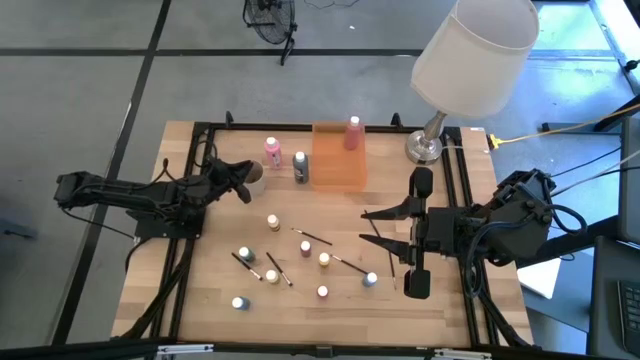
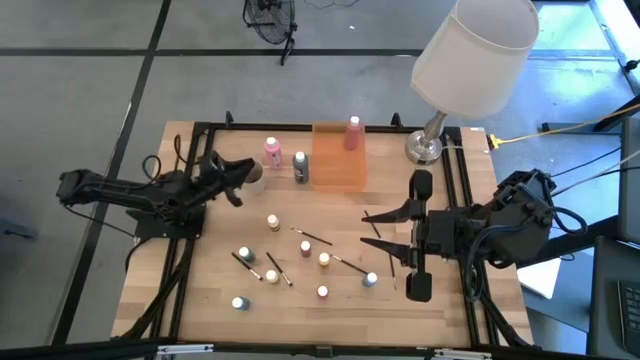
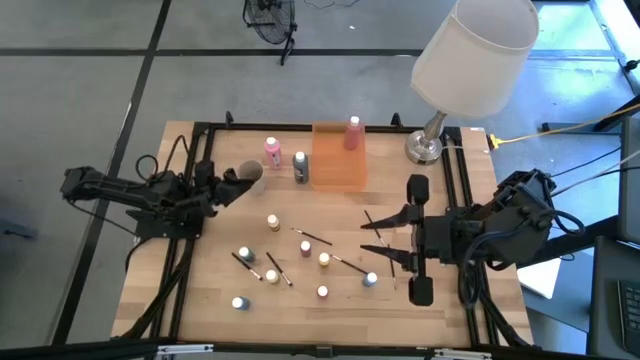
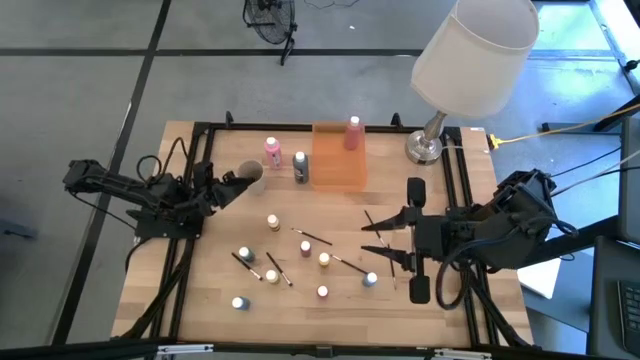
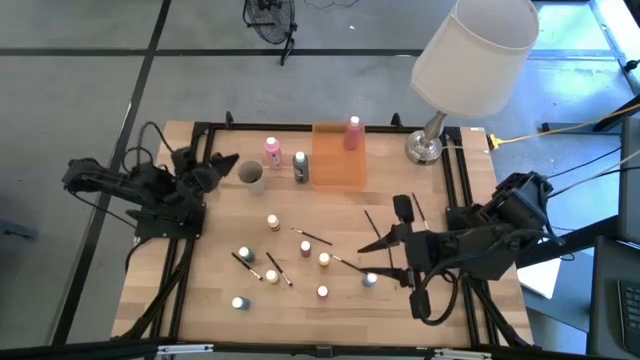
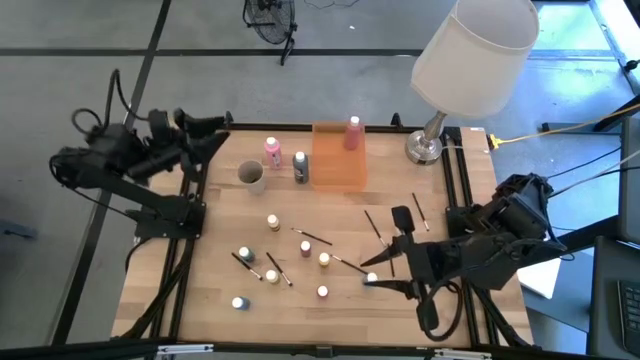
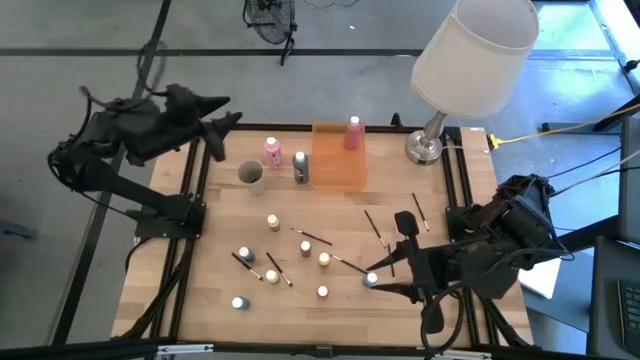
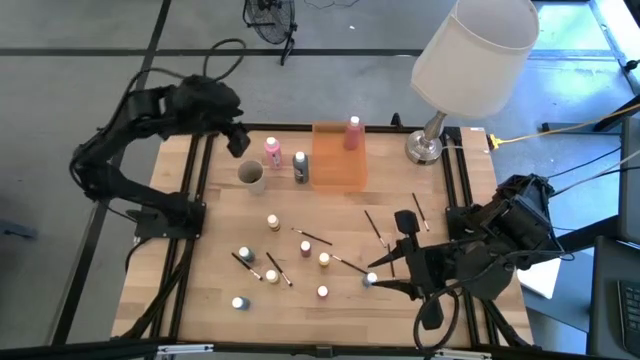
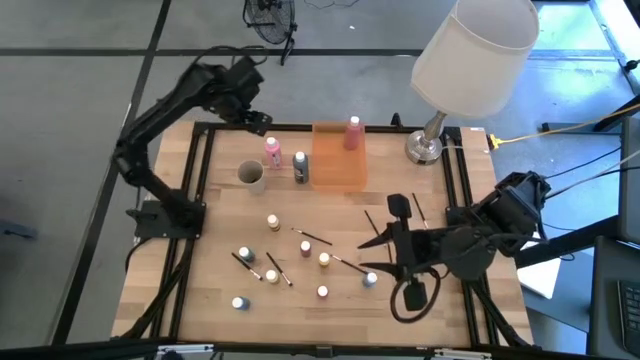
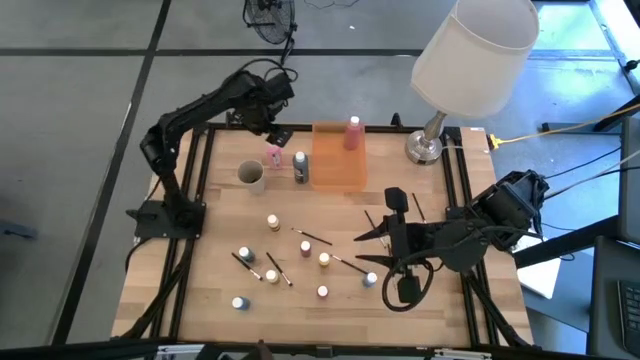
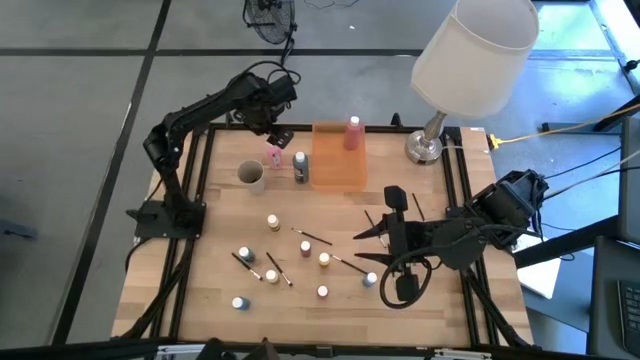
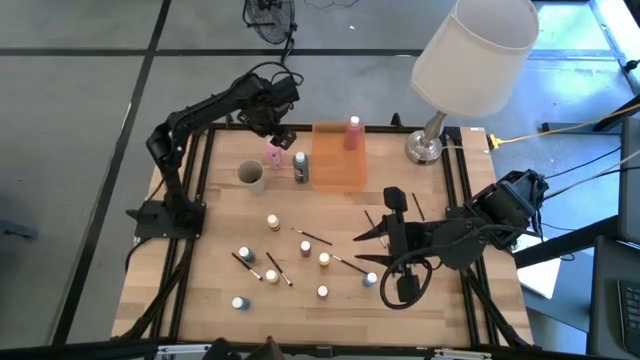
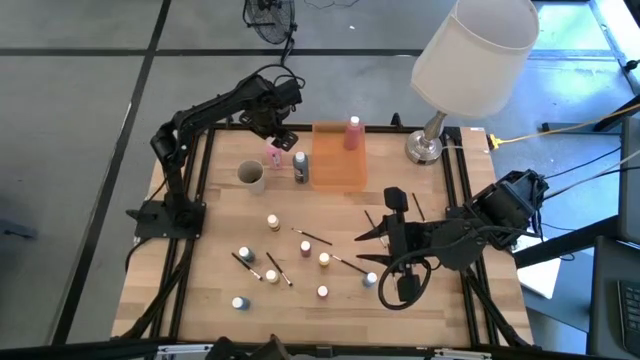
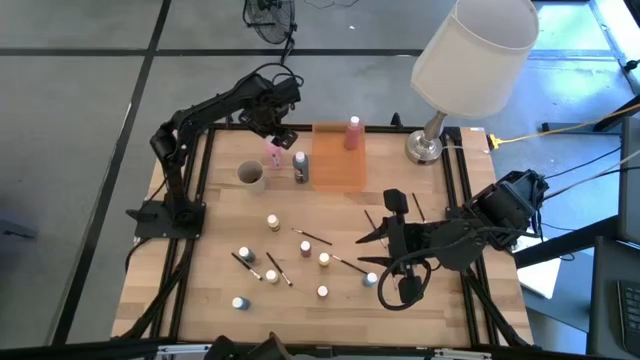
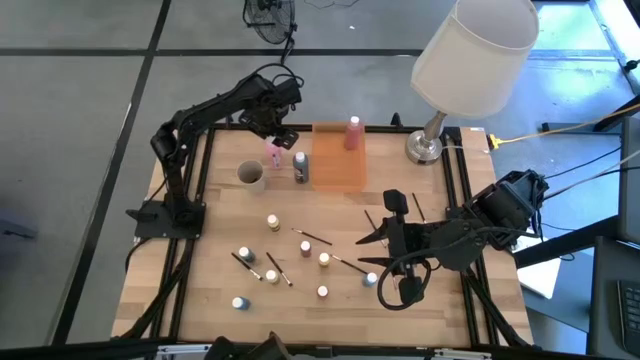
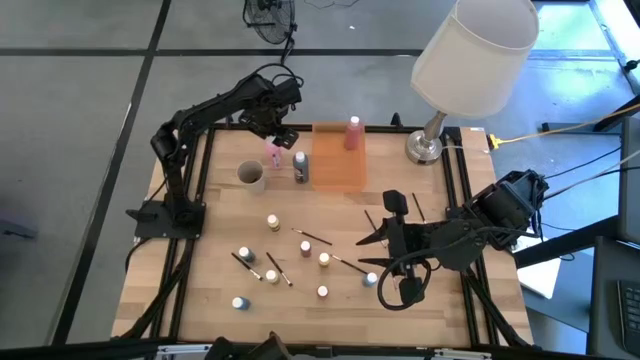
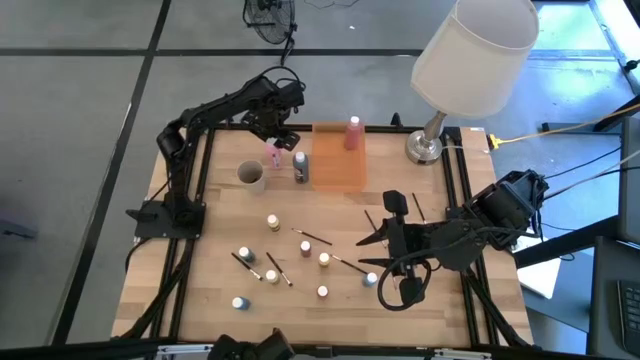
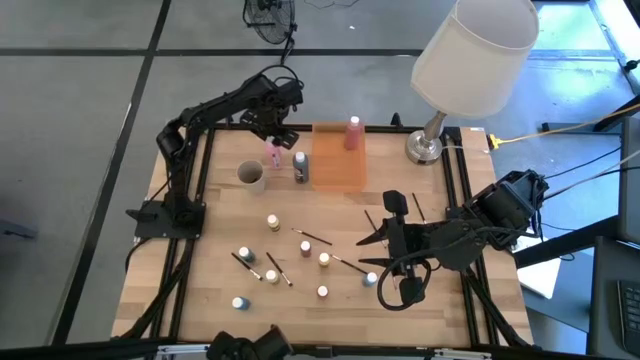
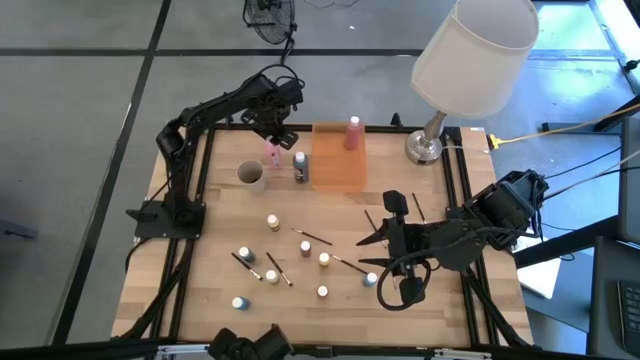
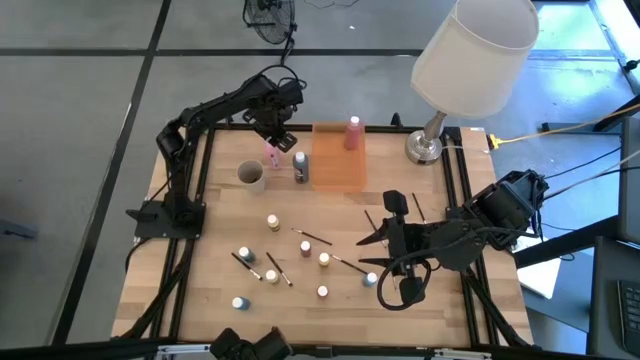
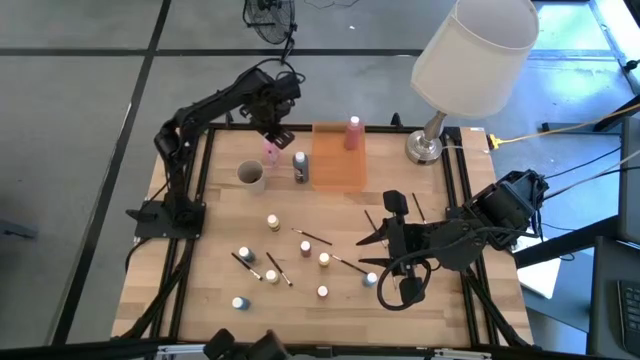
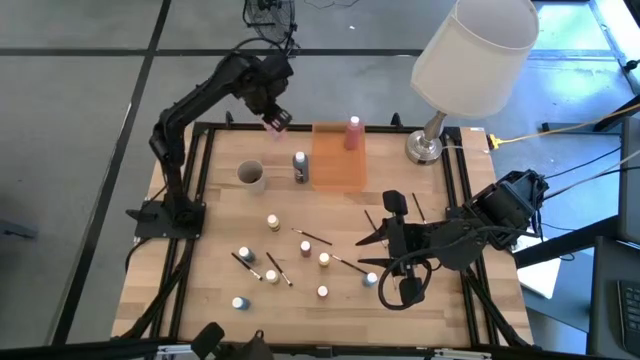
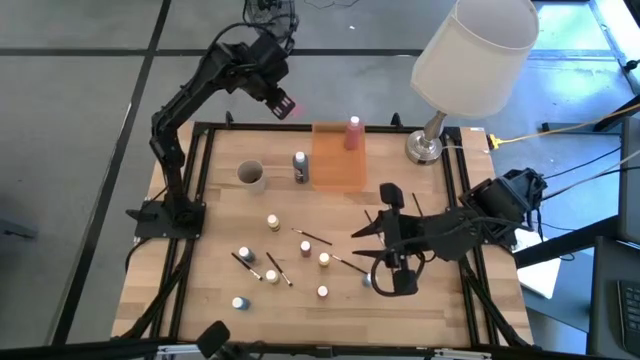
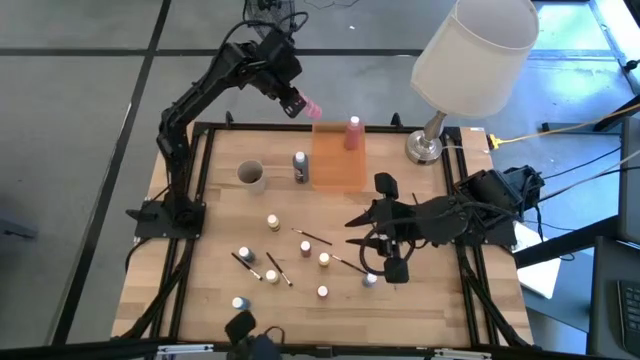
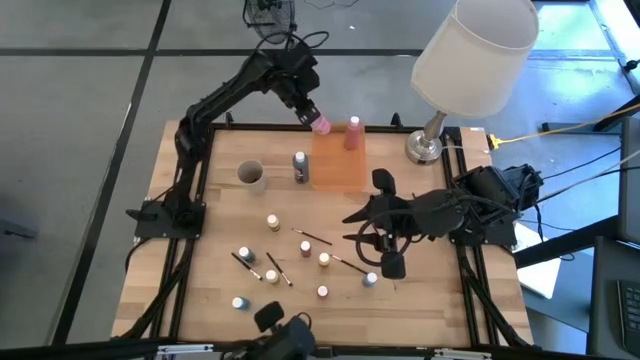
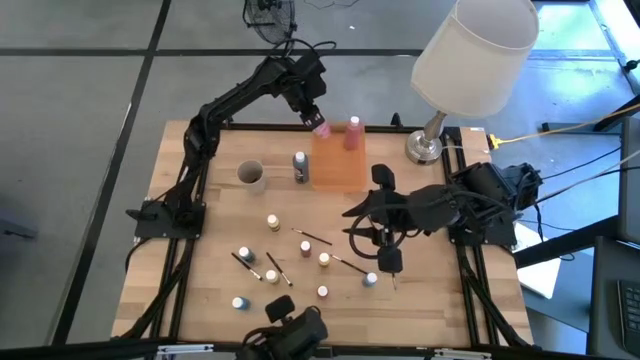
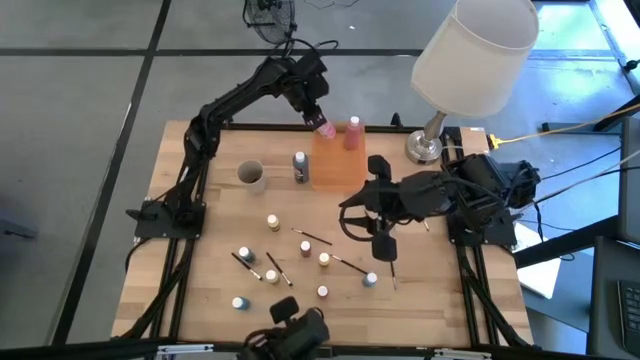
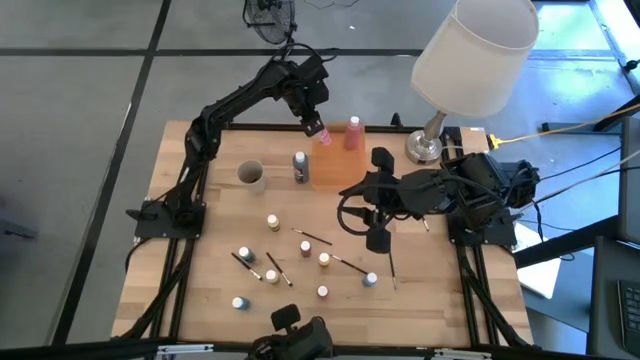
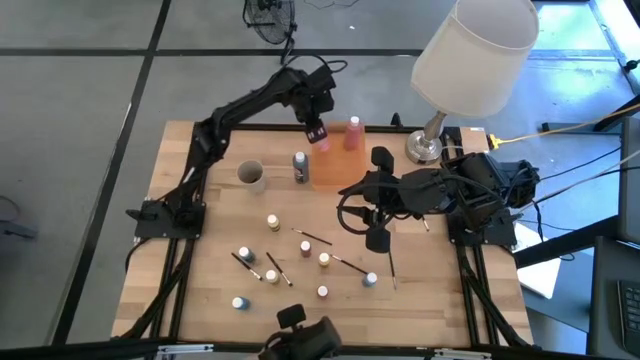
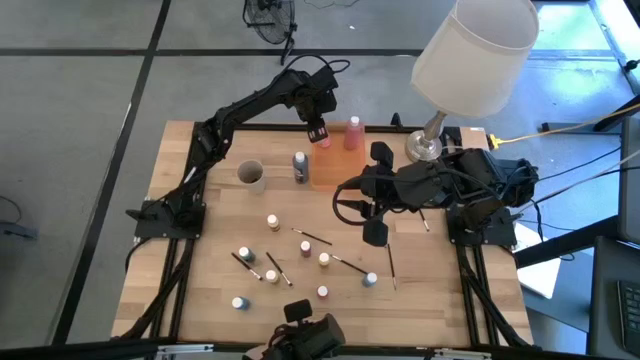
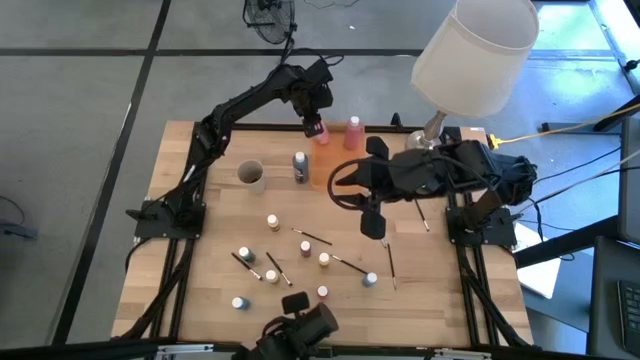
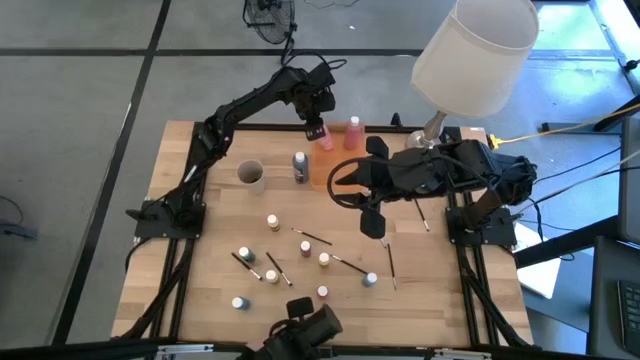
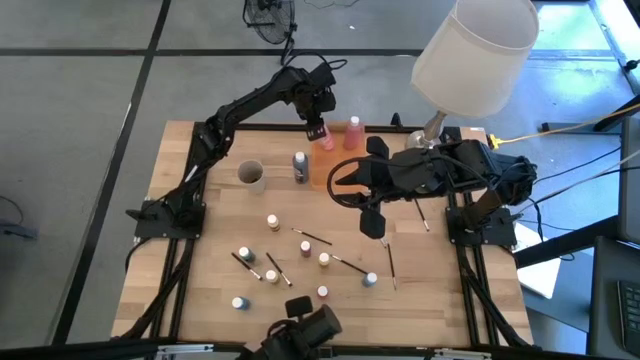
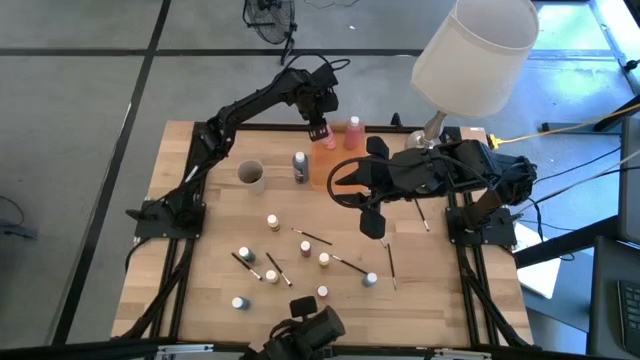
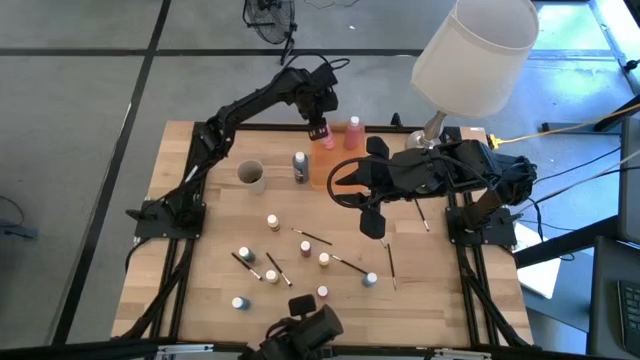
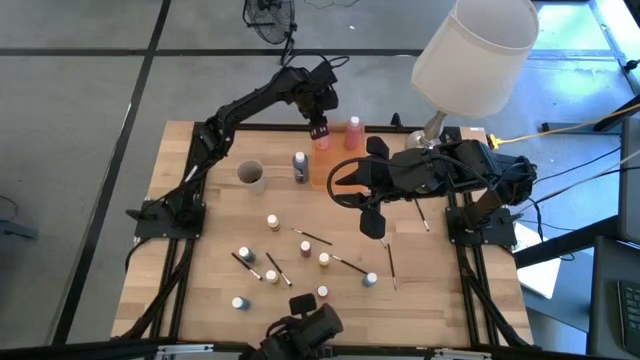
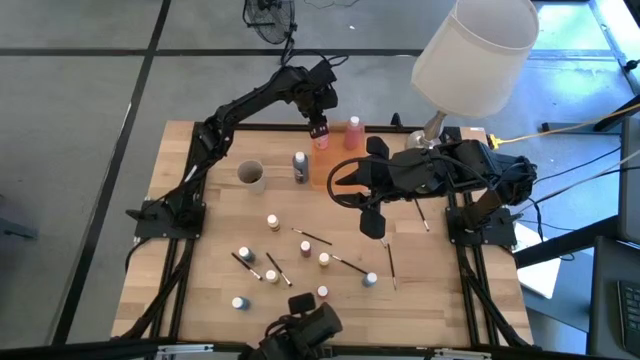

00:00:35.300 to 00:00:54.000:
Task: Pick & Place Paint Supplies
Put the large pink paint bottle into the orange bin
